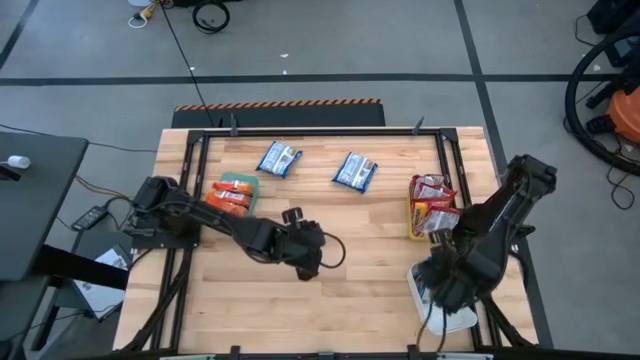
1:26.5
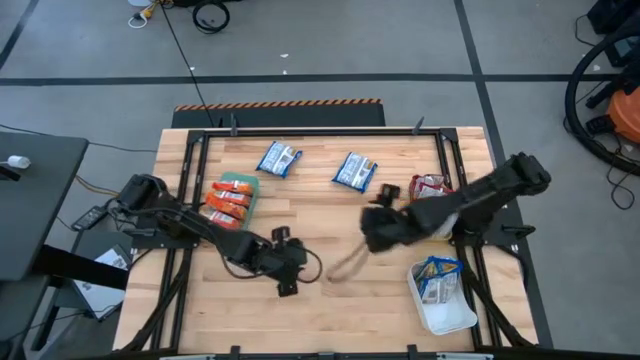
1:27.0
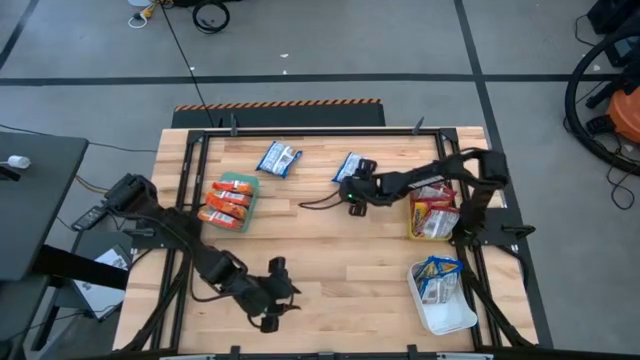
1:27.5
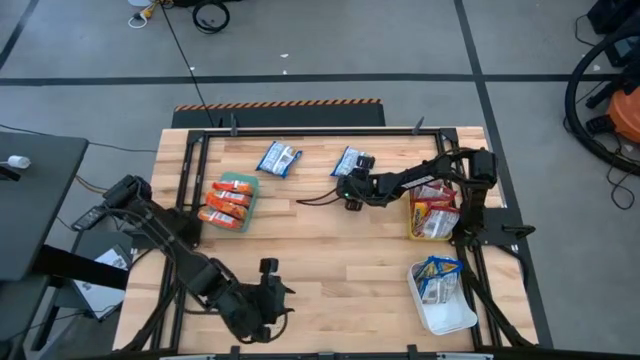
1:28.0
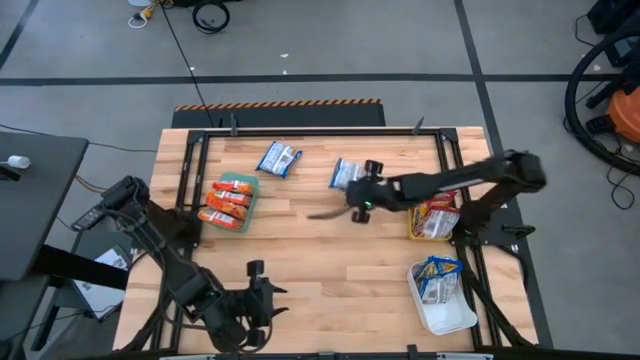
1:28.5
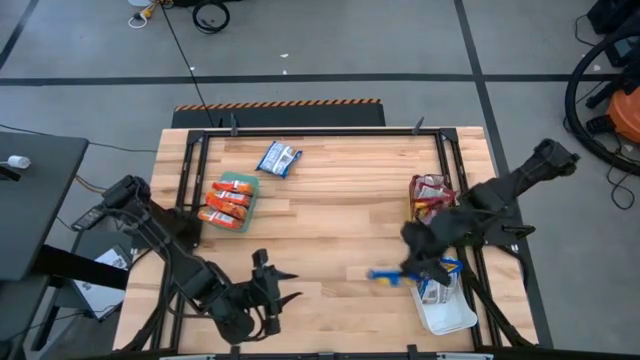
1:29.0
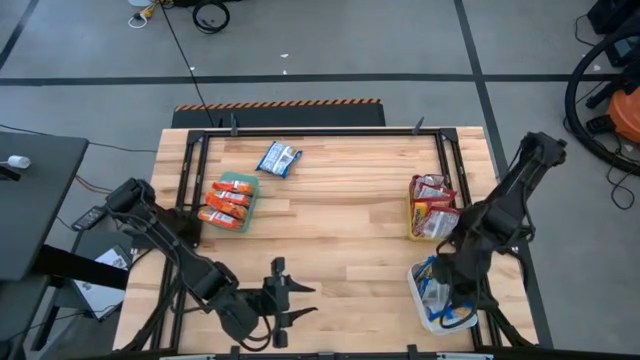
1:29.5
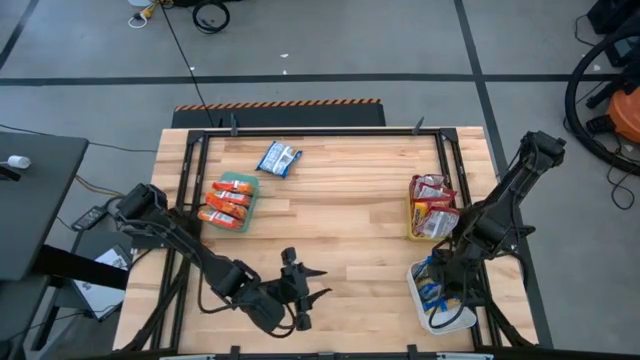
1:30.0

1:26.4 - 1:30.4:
Task: Sort Maruchan noodles
Put the blue noodle pack into the white bin

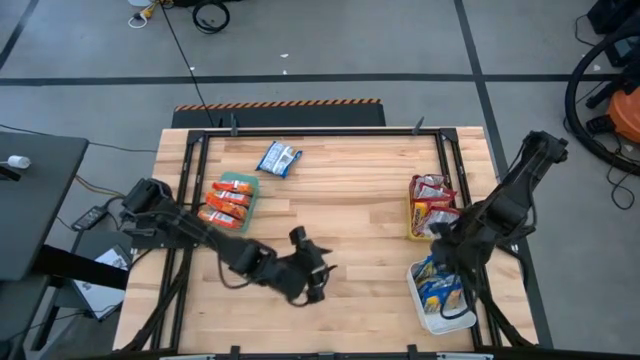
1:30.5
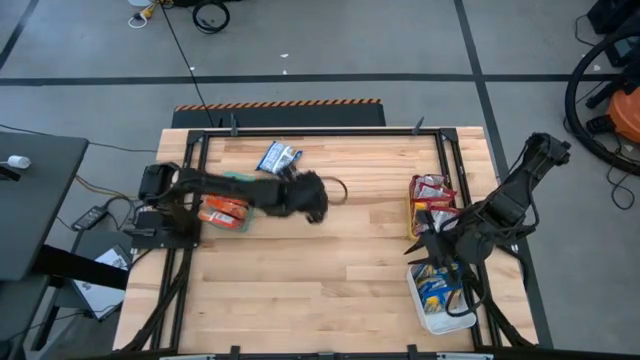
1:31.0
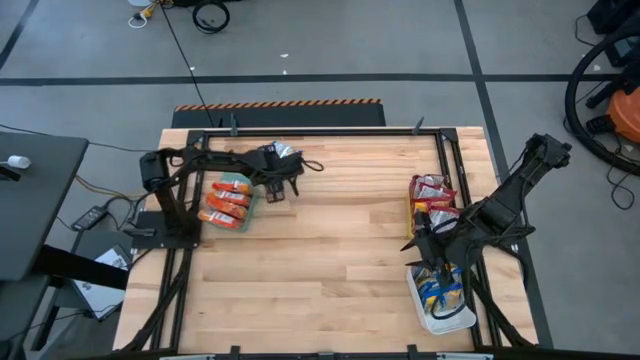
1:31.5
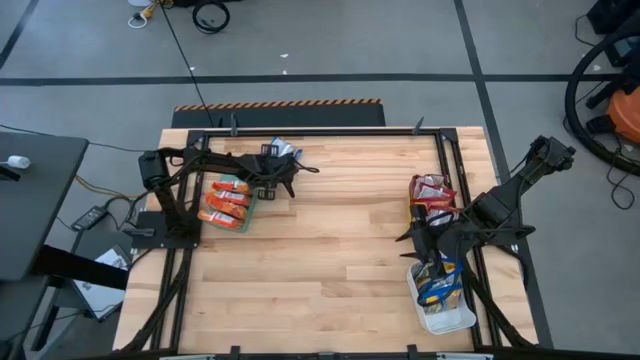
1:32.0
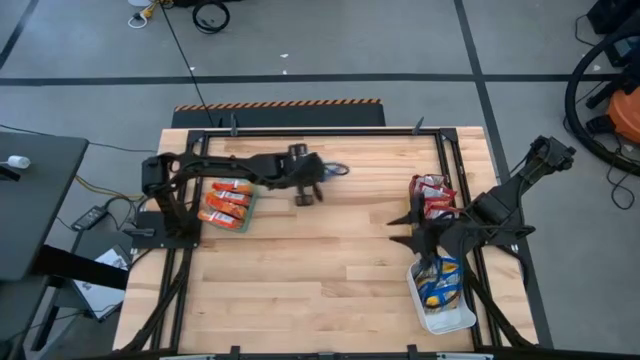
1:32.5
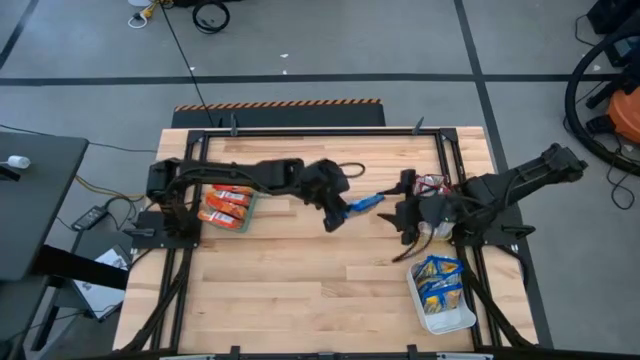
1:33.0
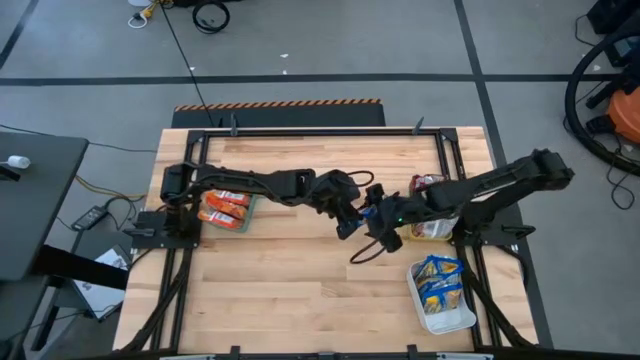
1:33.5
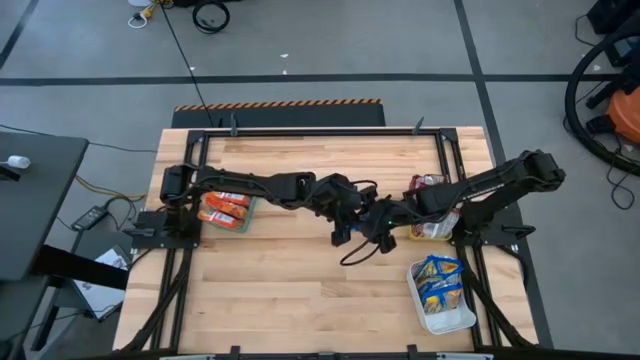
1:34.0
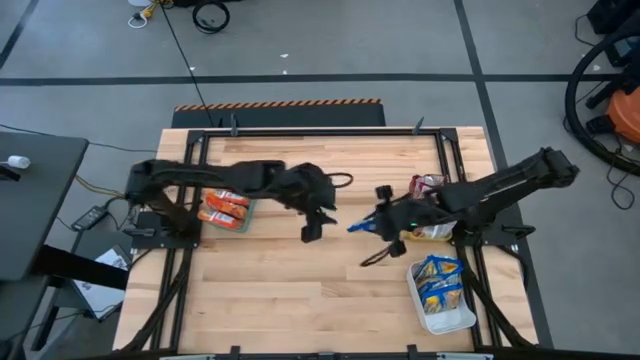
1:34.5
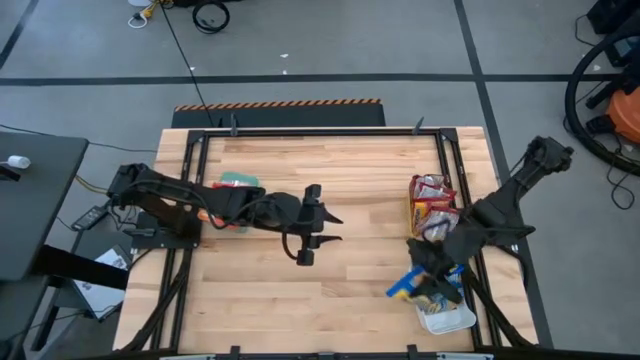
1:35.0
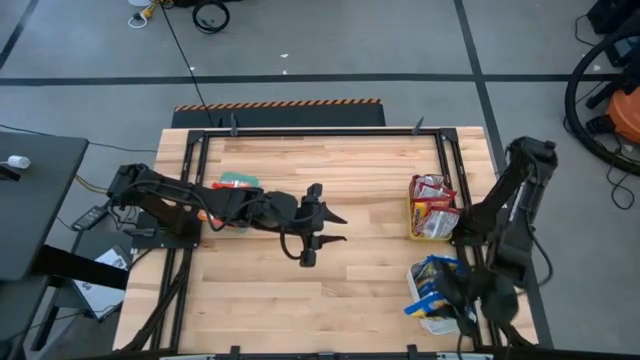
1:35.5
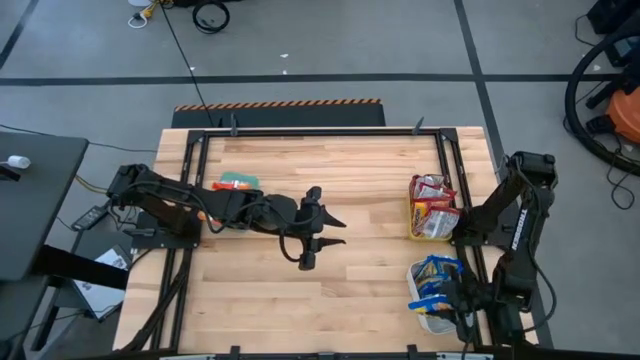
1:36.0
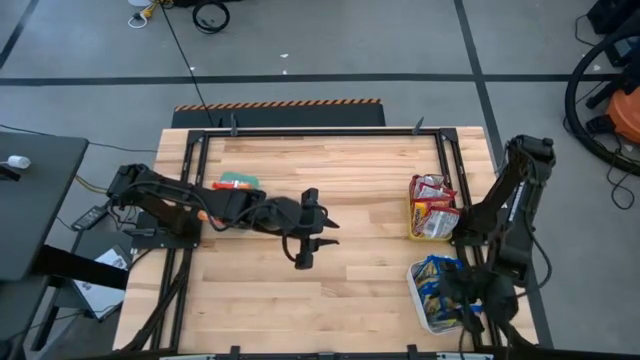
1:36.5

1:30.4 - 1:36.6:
Put the blue noodle pack into the white bin

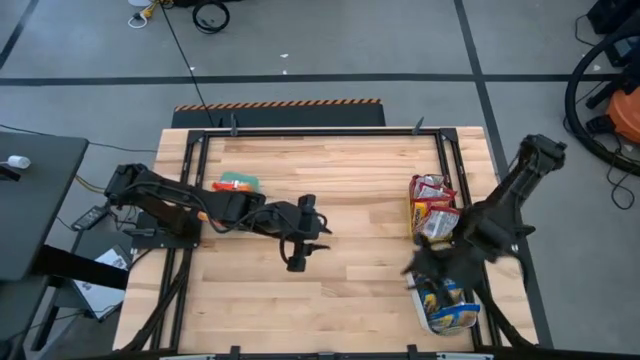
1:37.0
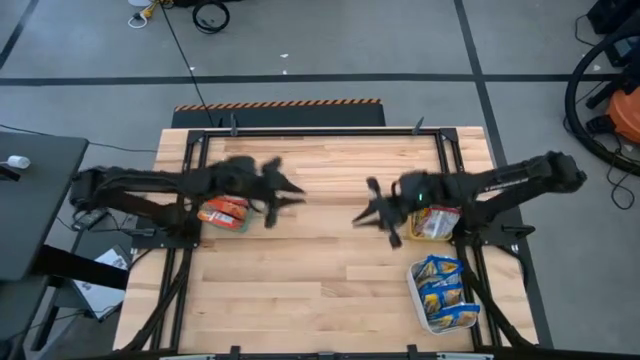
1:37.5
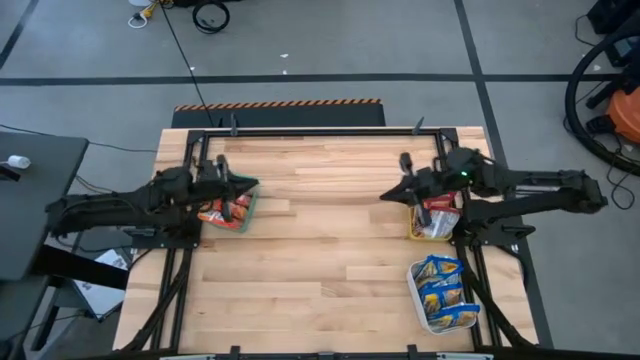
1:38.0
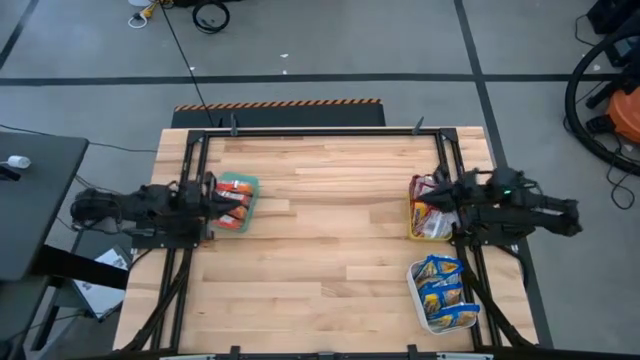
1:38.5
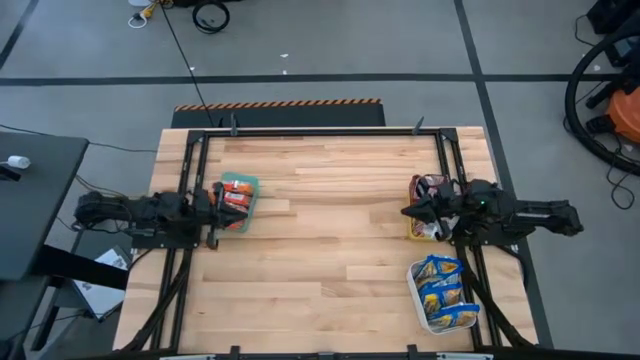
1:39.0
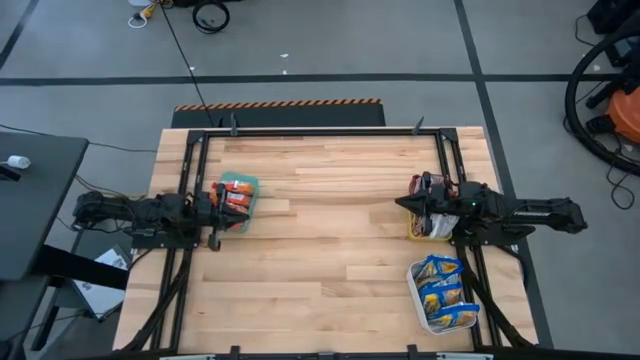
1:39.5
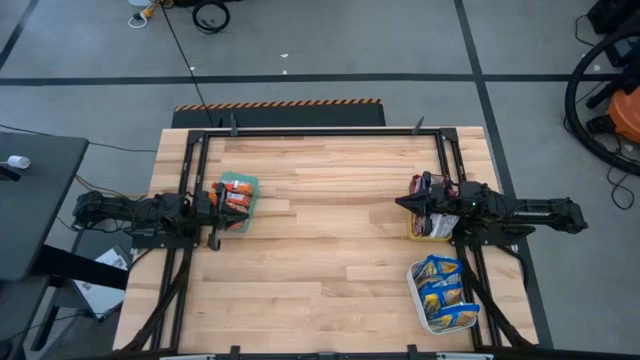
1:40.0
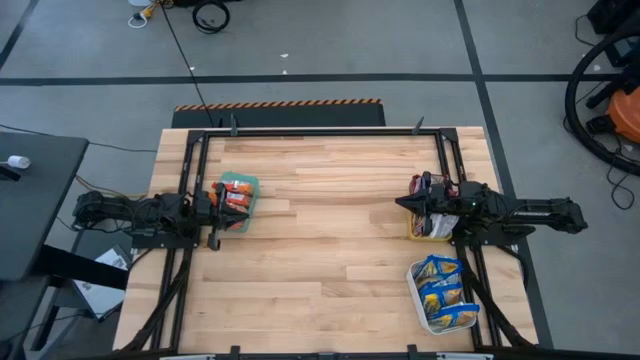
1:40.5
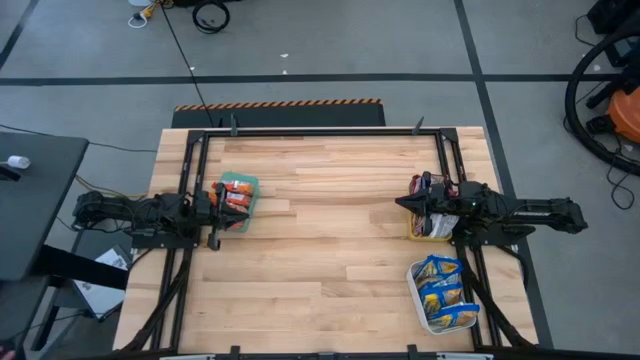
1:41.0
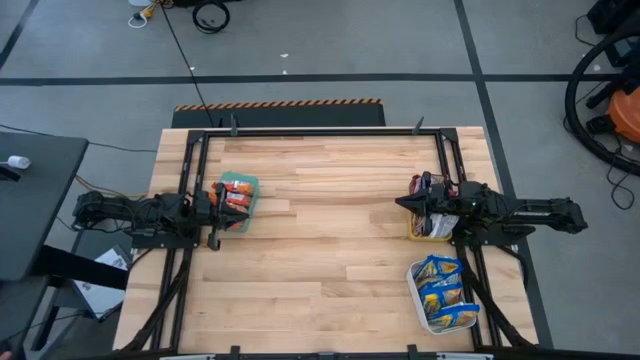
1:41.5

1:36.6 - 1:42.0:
Return to Home Position

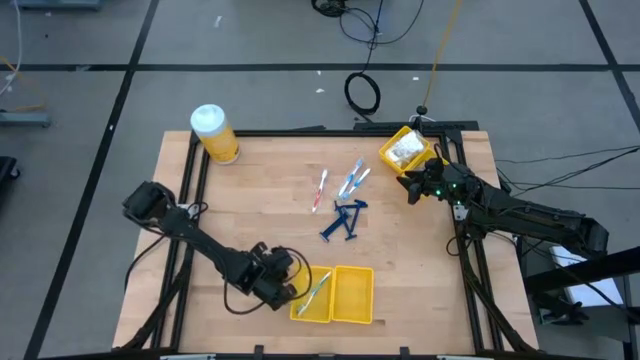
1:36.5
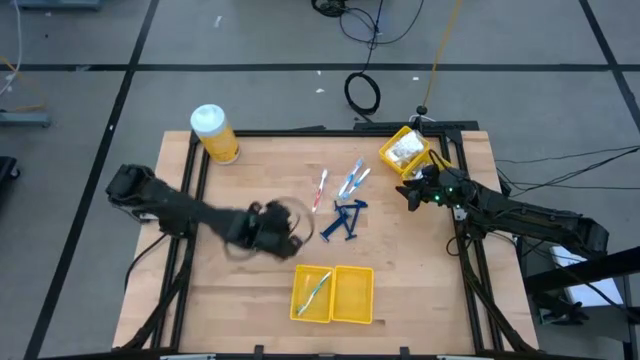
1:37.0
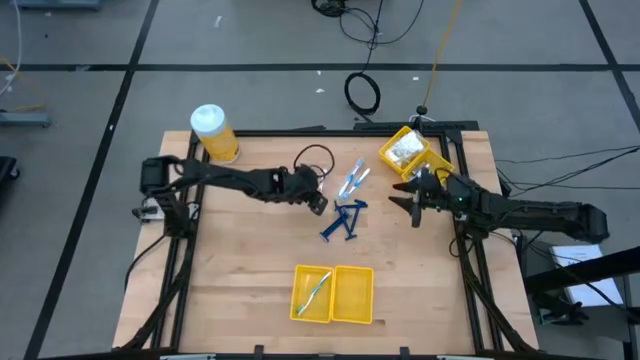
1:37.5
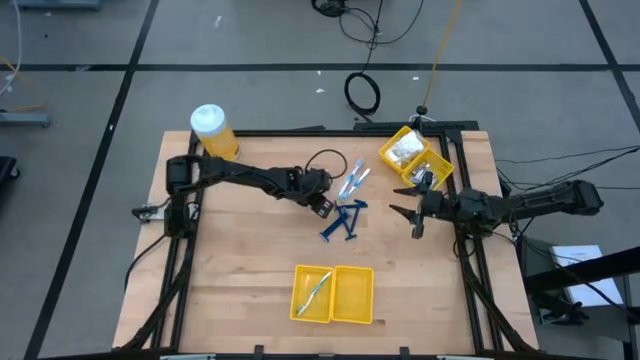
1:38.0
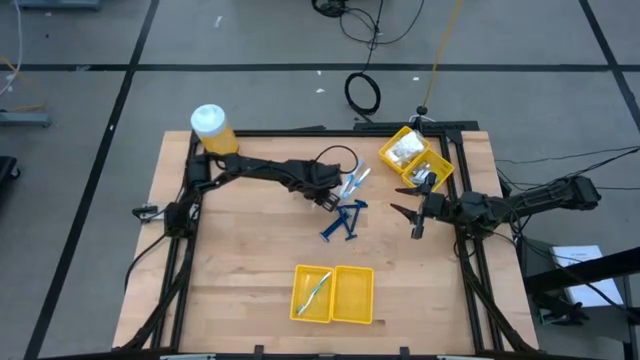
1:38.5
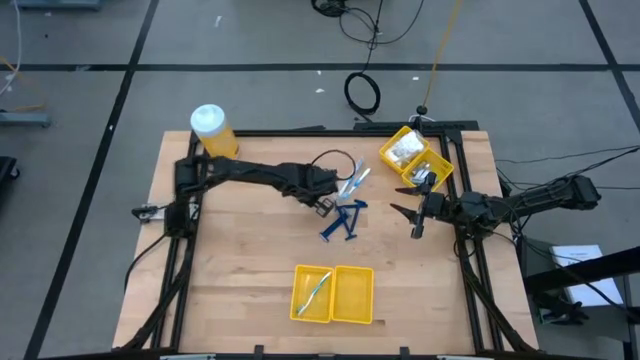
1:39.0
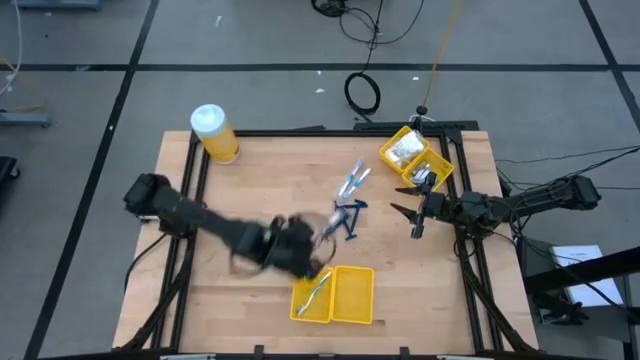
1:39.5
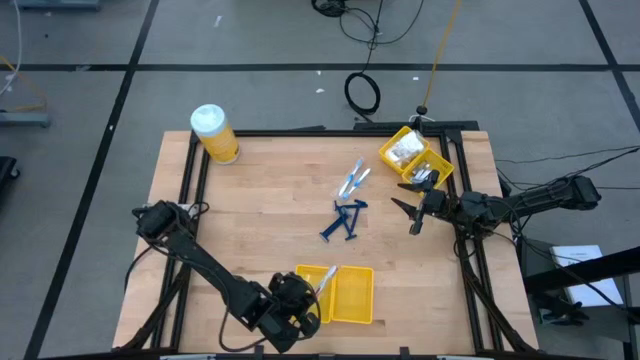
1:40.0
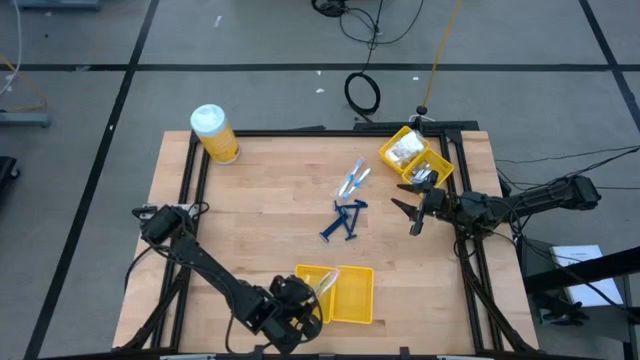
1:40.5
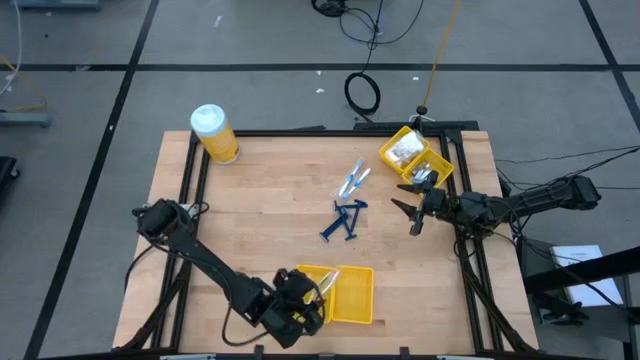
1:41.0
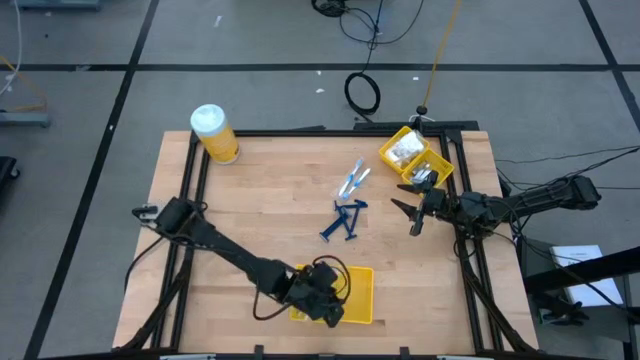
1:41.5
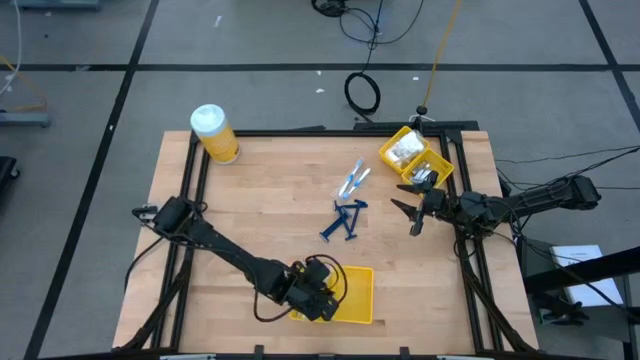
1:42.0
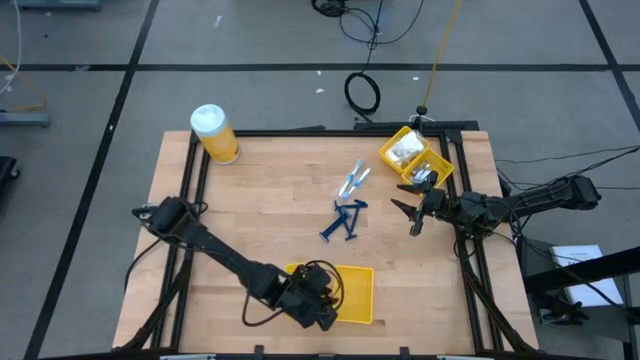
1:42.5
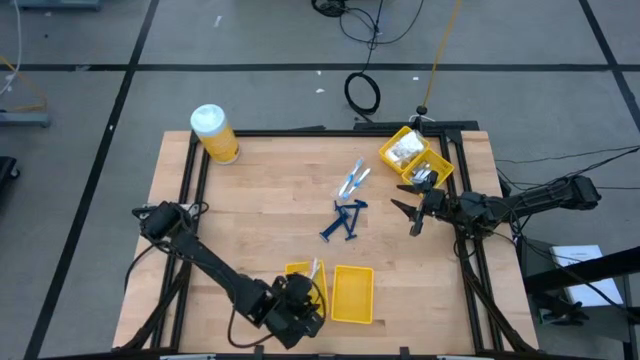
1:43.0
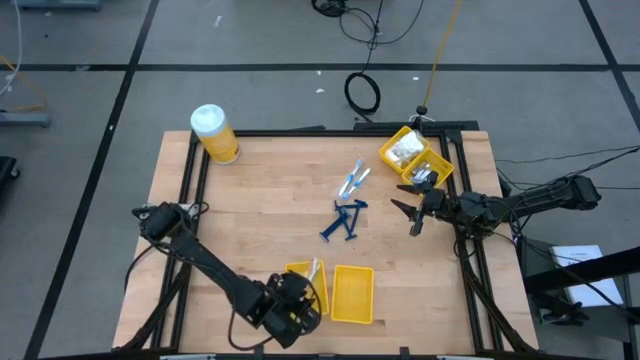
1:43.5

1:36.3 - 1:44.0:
Task: Pick & Place Travel size toiletries
Put the white and red toothbrush into the bottom left yellow bin
